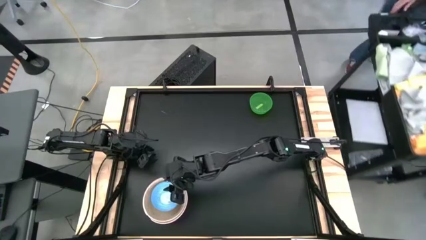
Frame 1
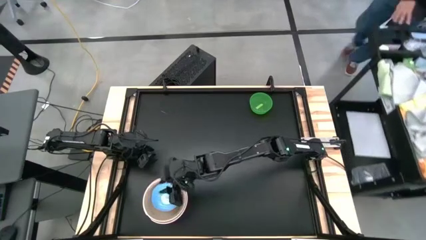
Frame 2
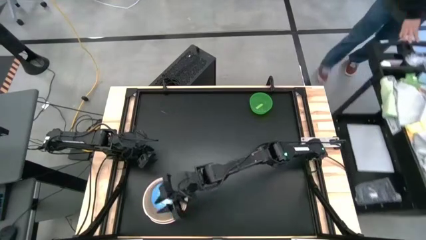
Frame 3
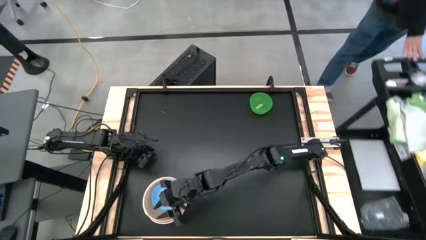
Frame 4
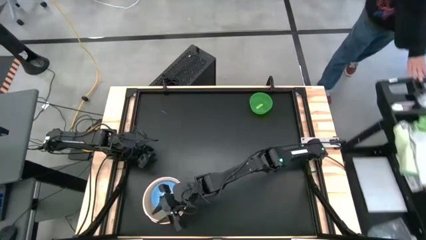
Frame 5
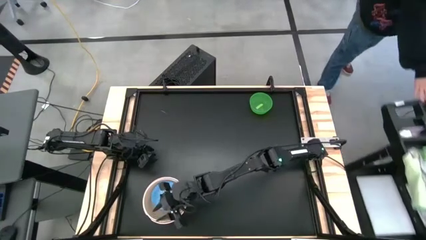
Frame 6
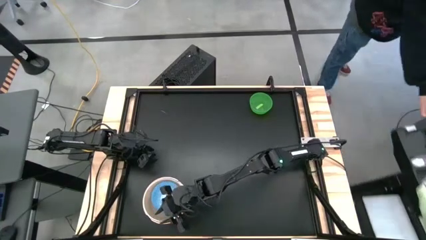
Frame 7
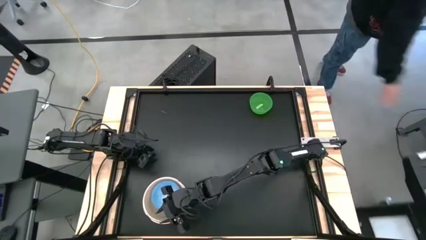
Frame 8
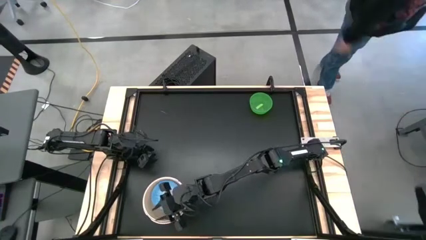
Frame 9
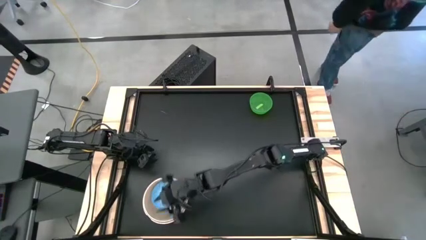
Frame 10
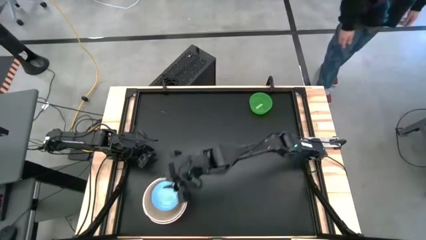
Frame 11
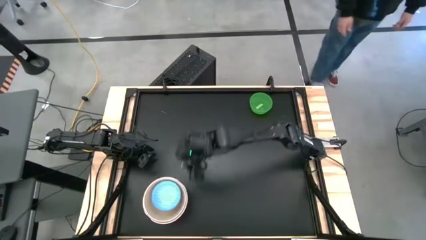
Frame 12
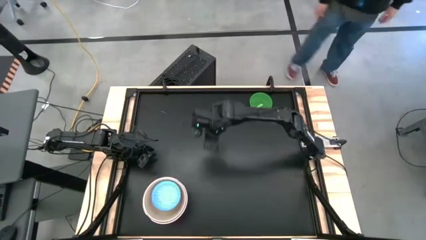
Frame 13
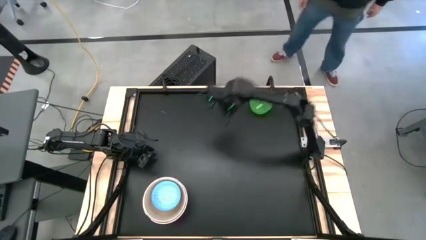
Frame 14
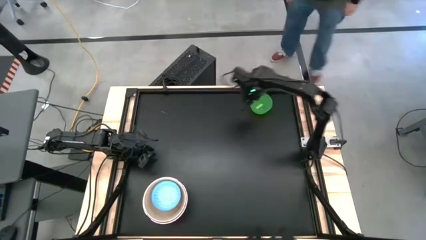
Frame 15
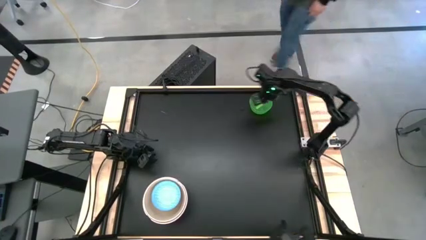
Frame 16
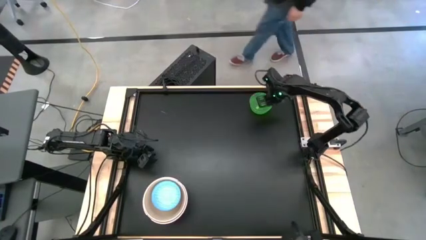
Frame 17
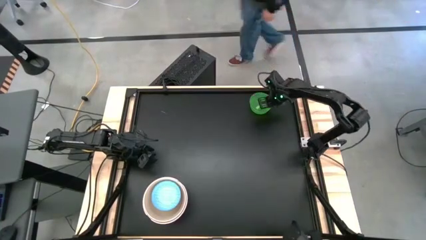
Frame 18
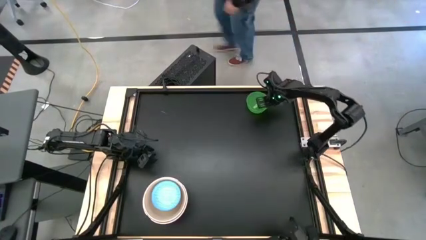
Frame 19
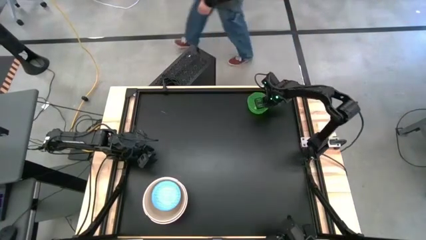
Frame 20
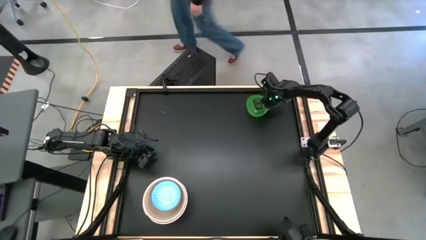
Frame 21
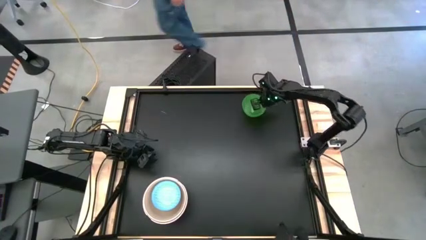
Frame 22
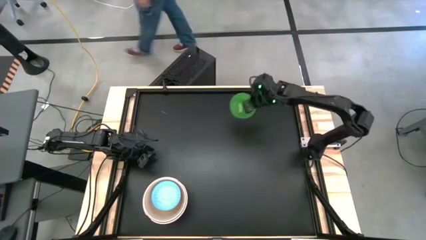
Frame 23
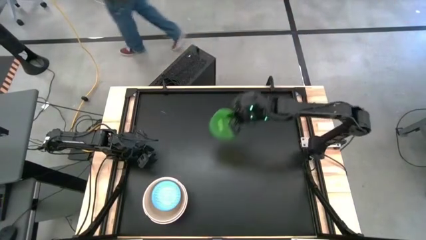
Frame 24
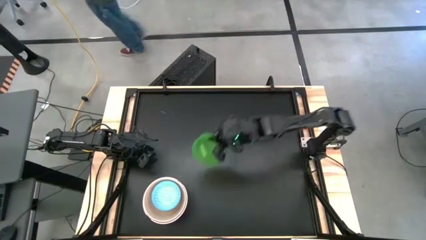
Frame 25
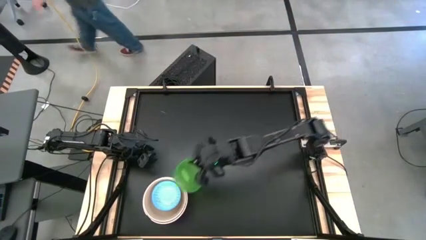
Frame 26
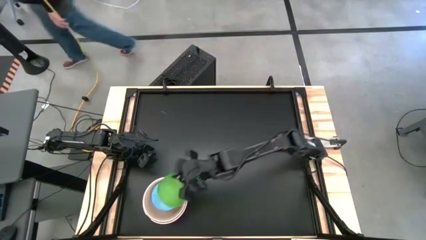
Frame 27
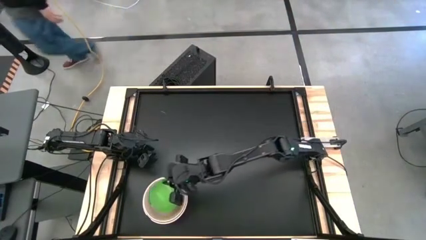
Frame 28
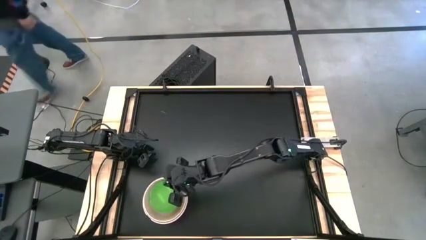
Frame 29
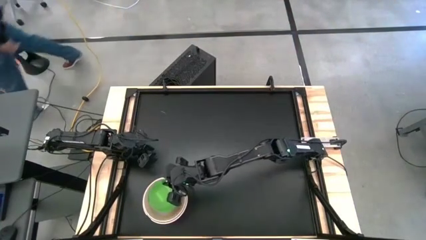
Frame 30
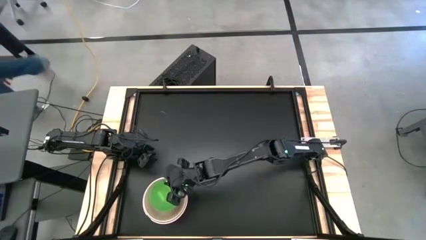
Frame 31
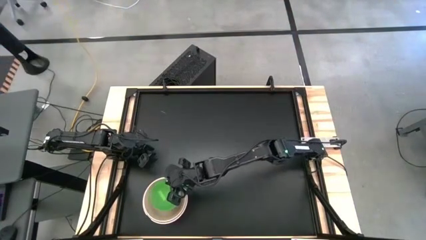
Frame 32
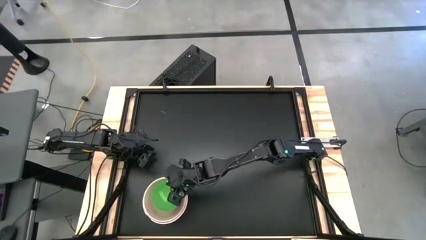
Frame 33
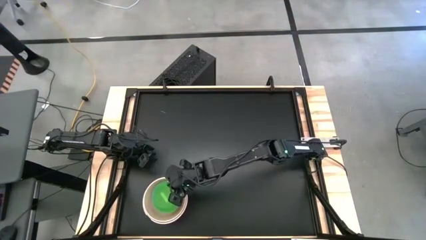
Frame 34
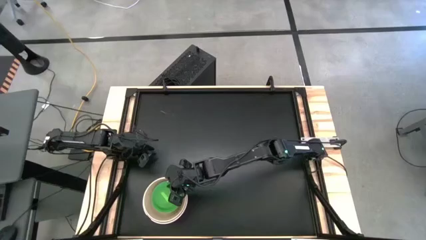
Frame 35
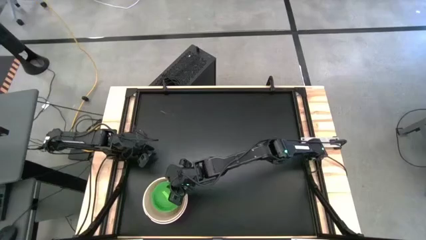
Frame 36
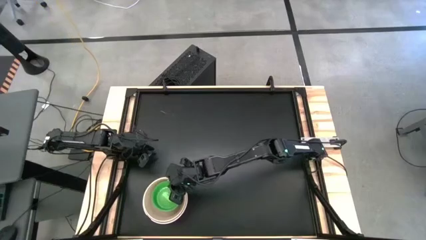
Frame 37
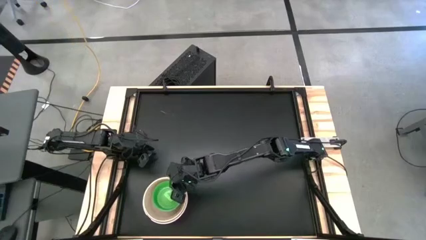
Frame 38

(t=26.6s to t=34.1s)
Stack the green bowl on top of the other pattern bowl

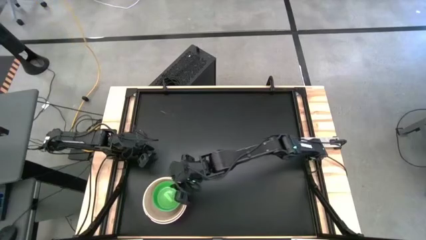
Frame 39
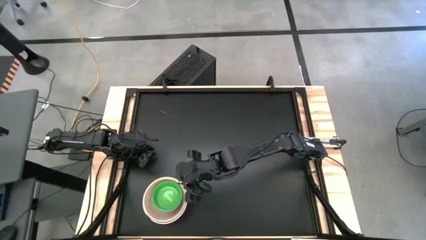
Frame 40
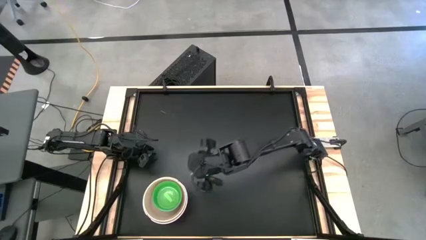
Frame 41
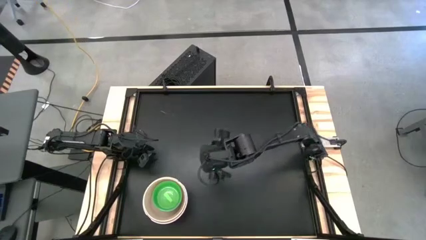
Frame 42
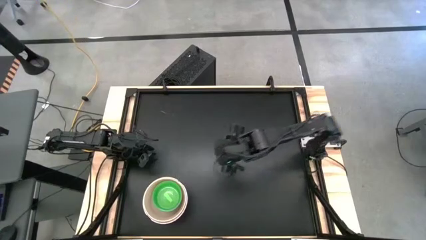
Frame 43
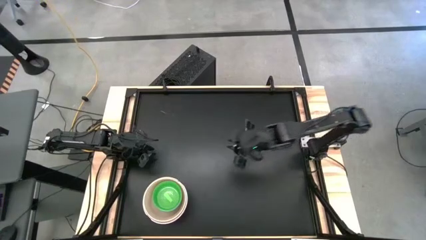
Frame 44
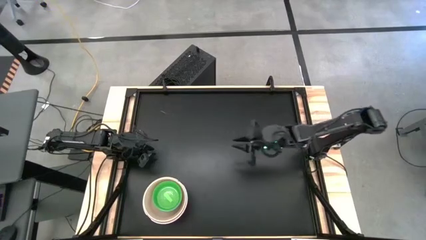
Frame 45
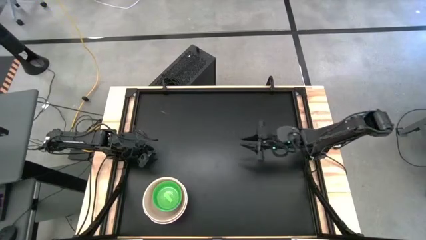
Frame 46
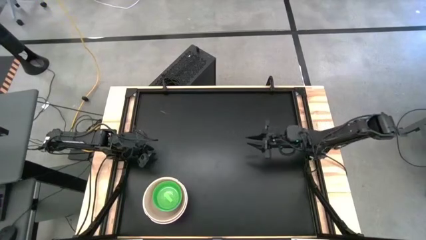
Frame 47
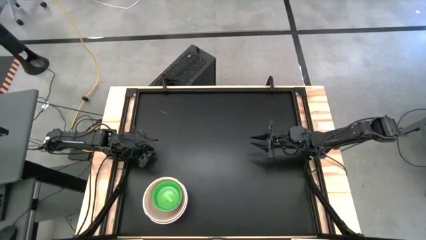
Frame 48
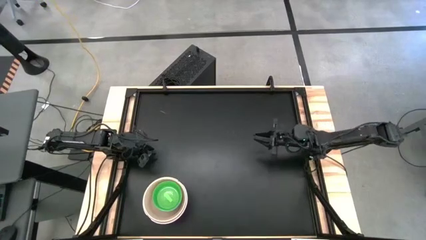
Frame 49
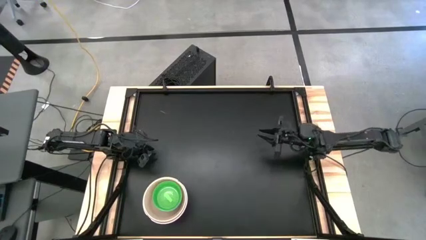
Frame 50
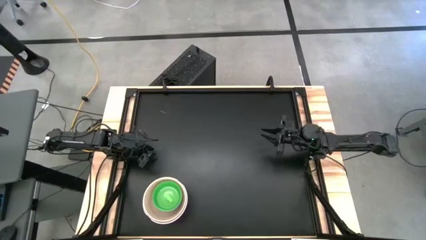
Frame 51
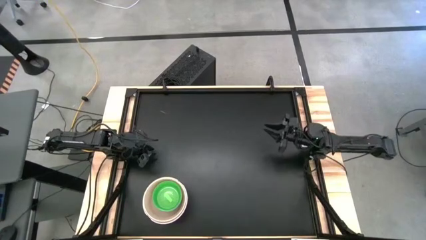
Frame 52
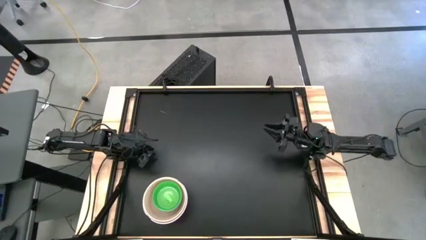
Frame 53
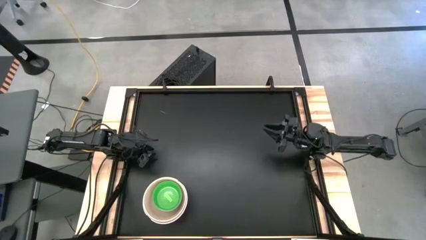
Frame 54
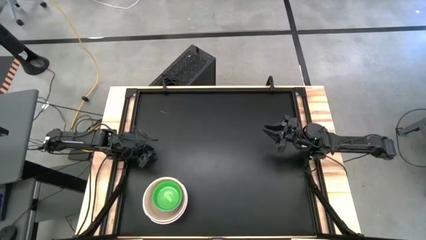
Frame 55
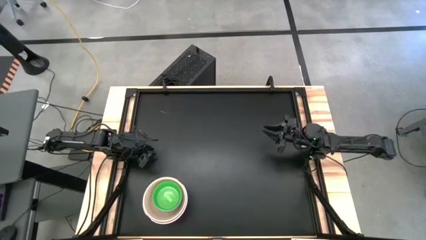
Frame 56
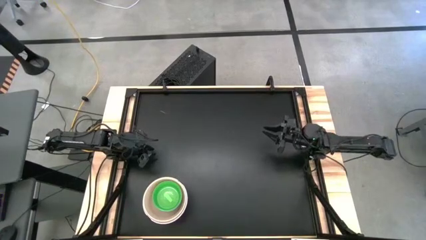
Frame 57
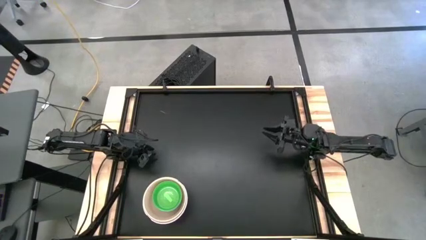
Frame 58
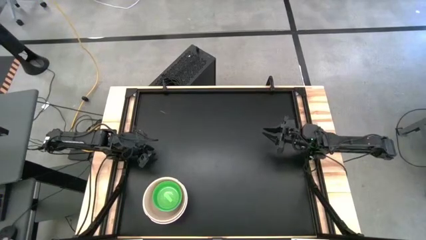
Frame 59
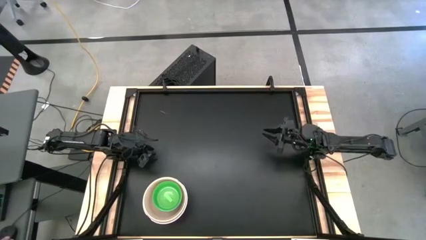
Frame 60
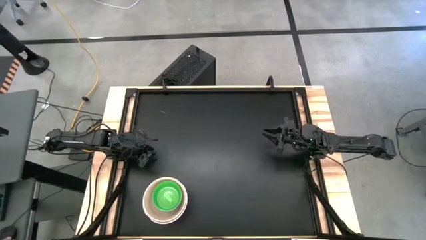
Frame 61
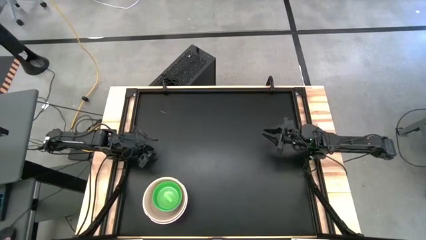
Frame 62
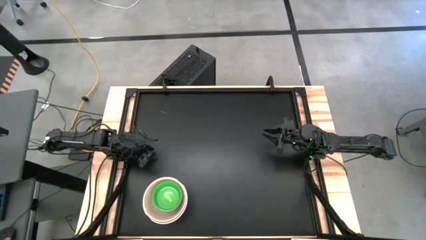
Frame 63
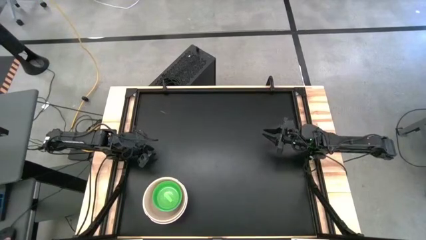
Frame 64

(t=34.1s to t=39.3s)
Return to Home Position
